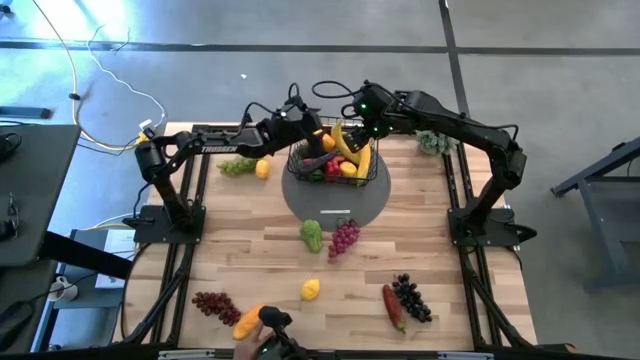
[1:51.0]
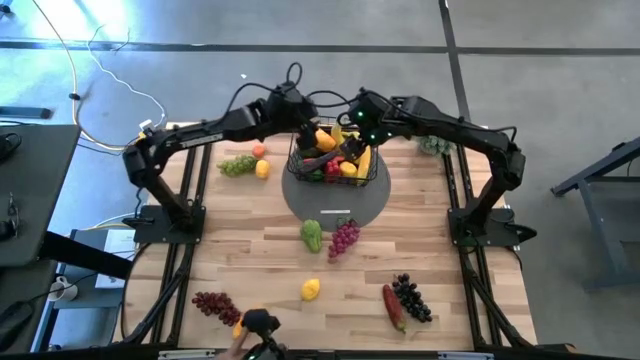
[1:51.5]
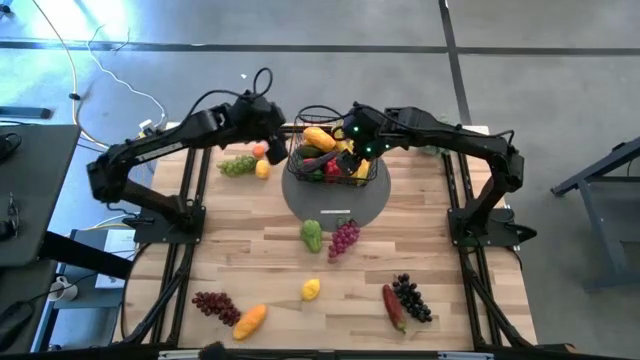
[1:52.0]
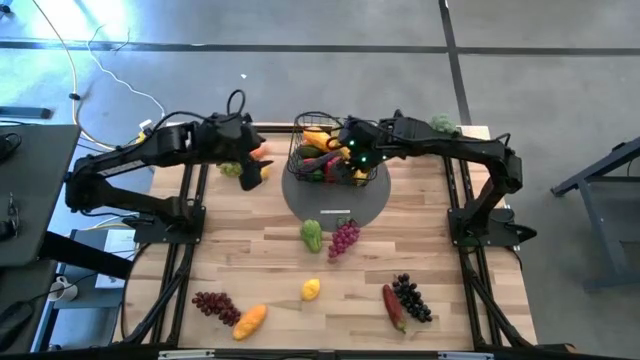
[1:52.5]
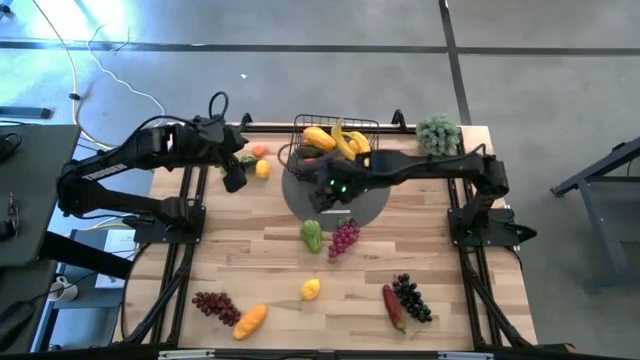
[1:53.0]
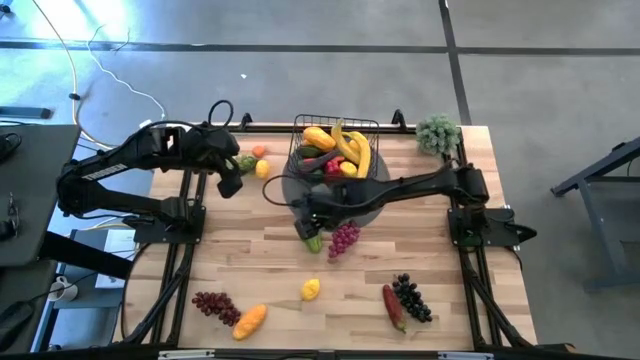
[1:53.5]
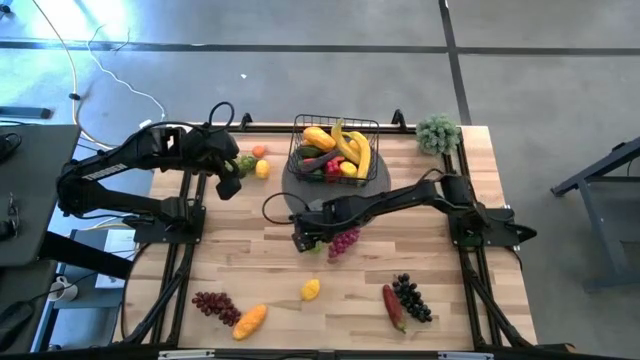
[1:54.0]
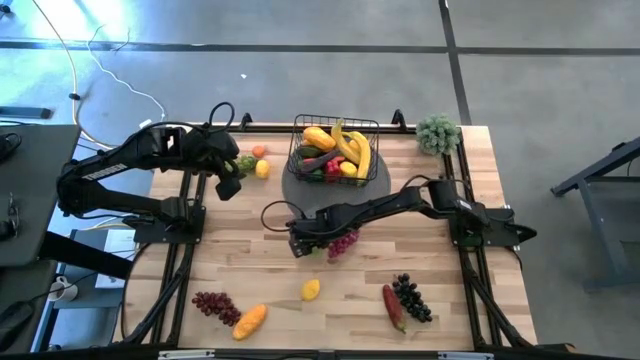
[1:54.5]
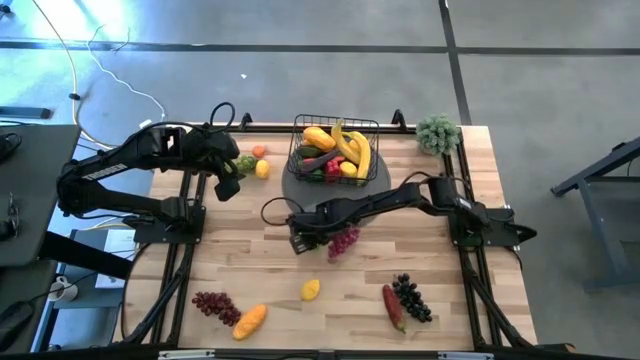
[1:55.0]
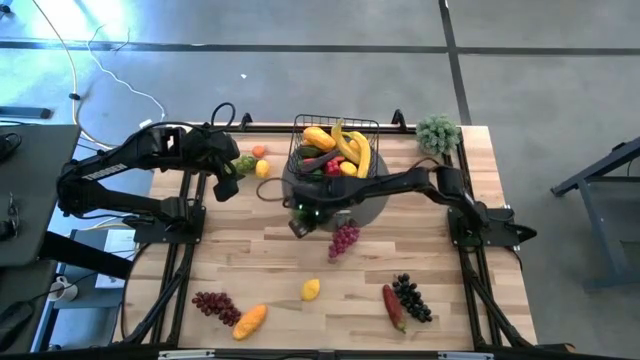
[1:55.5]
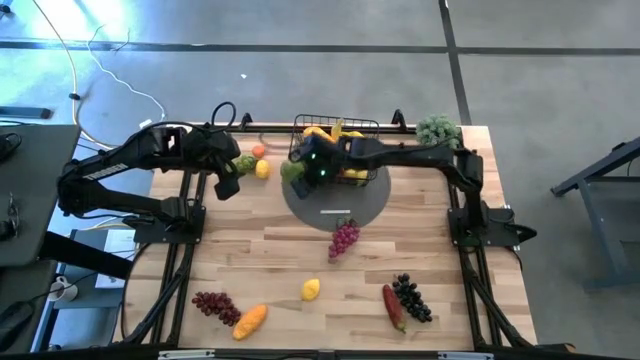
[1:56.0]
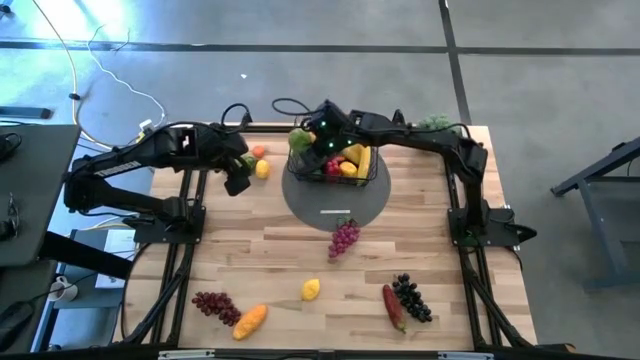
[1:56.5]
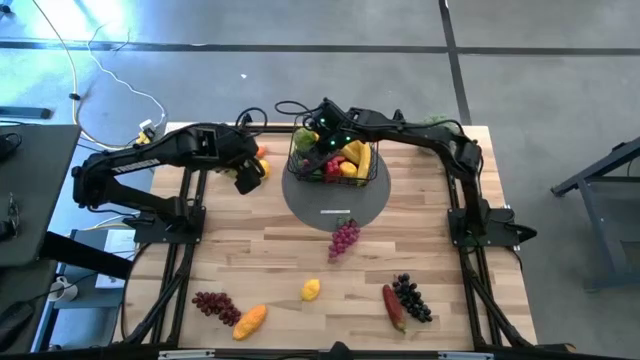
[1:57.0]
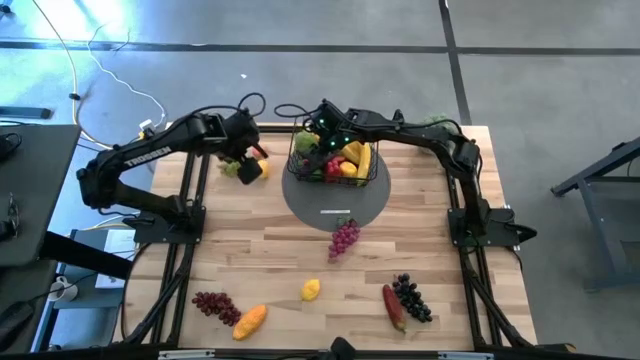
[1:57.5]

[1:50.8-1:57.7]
Task: Build produce basket
Put the green chayote into the wire basket

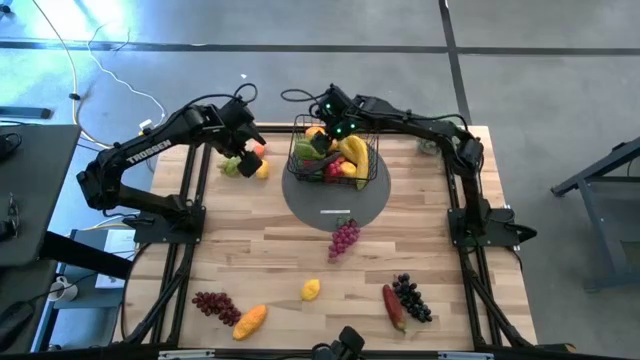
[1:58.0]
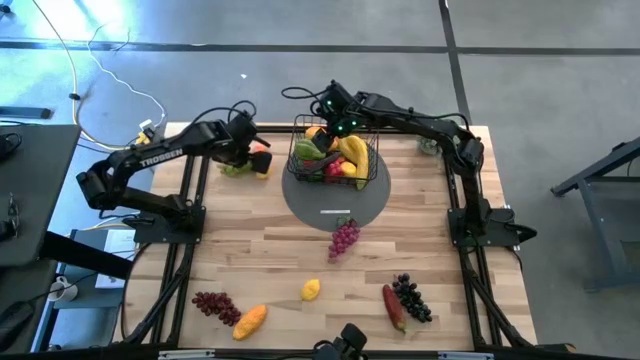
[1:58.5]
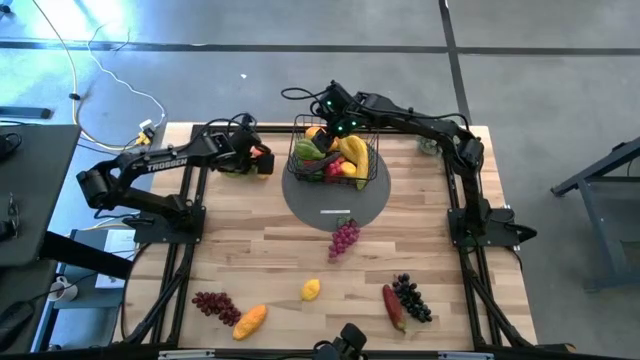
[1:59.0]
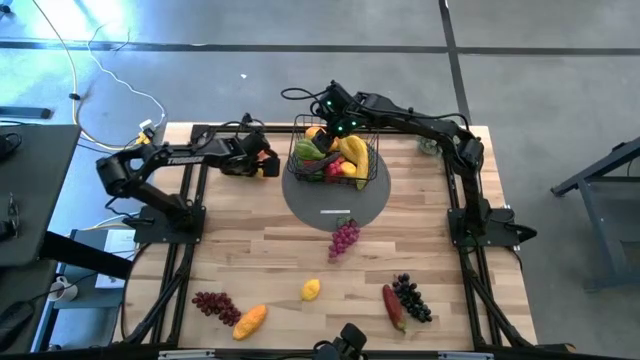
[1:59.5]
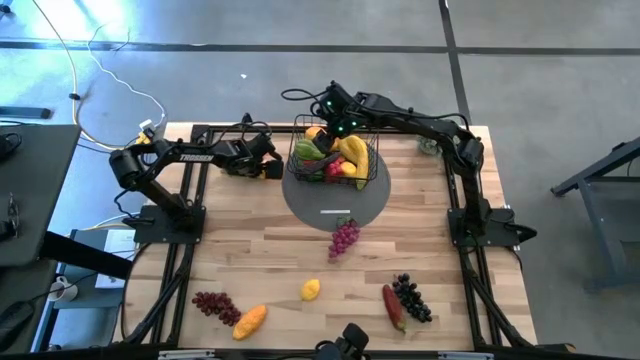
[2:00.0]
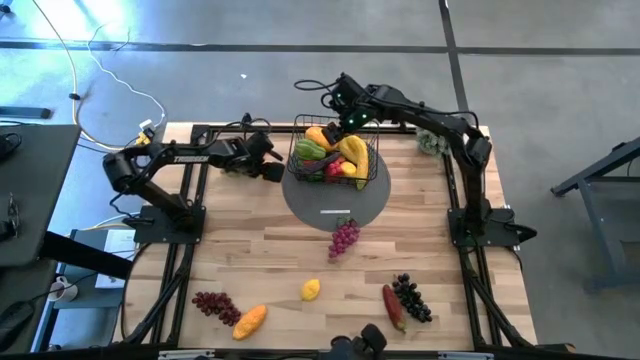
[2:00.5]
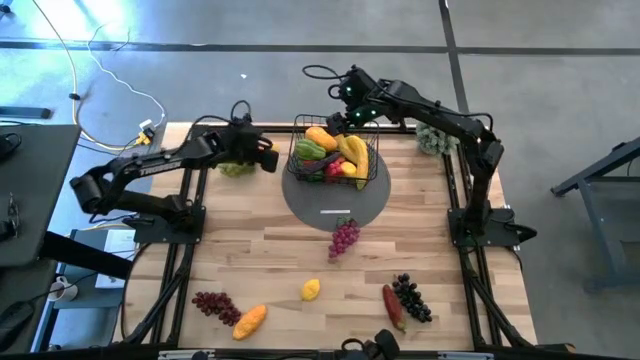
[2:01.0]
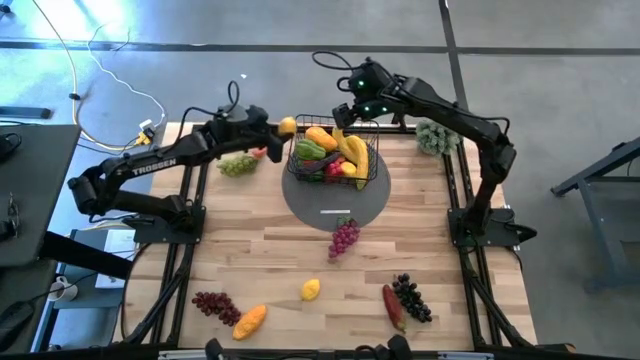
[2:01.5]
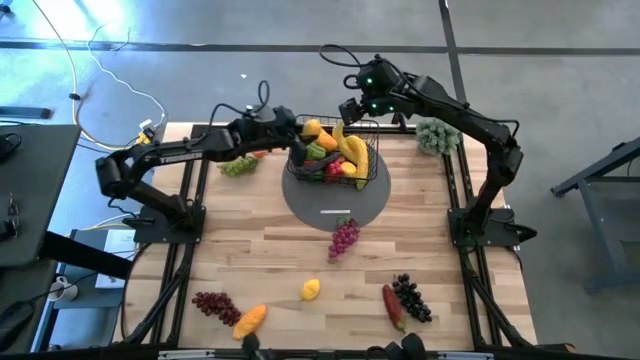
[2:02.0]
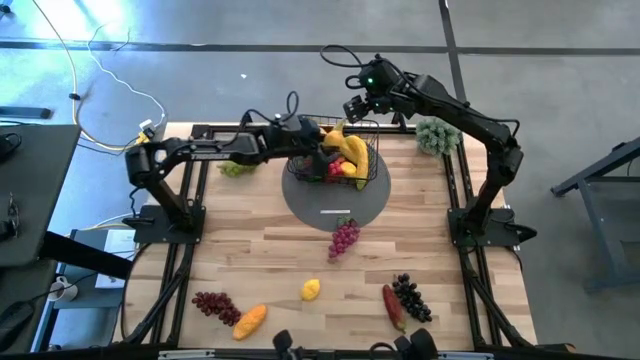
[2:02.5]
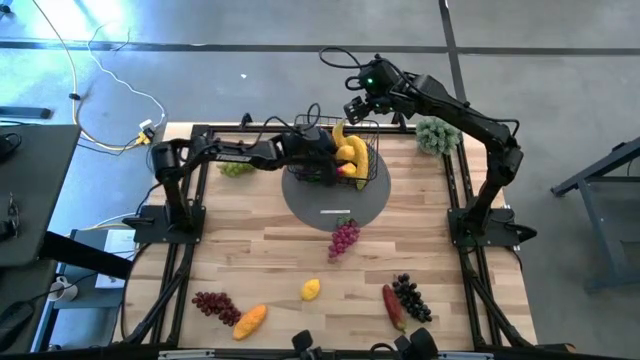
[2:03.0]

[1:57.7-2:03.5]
Put the yellow lemon into the wire basket

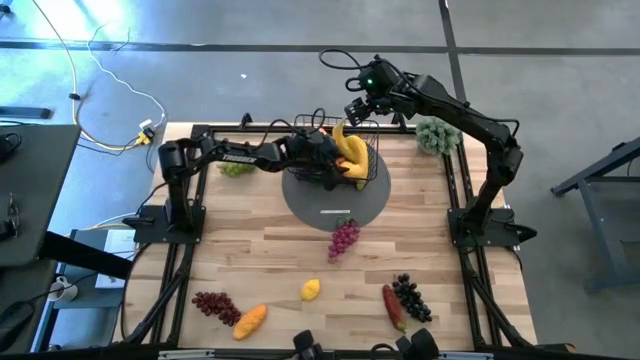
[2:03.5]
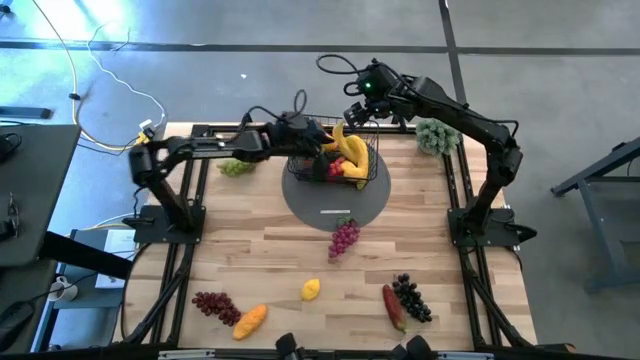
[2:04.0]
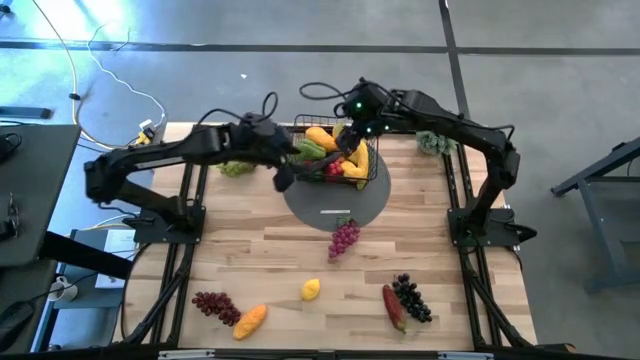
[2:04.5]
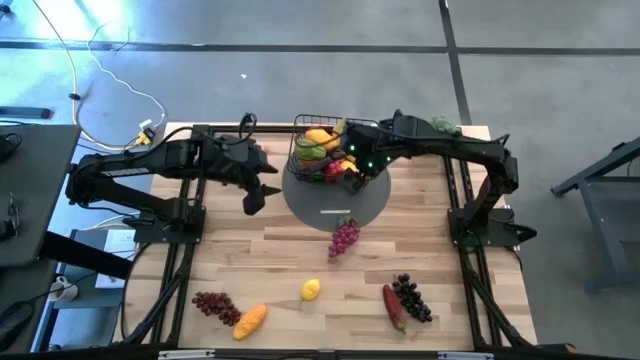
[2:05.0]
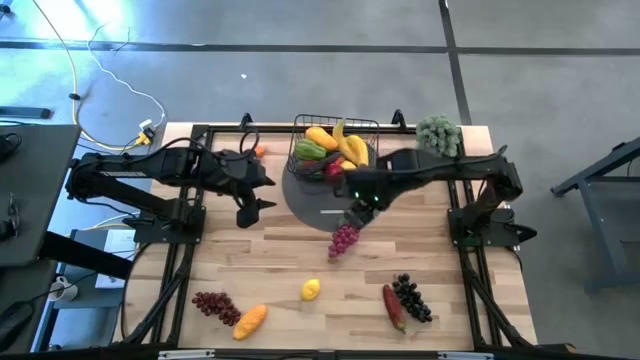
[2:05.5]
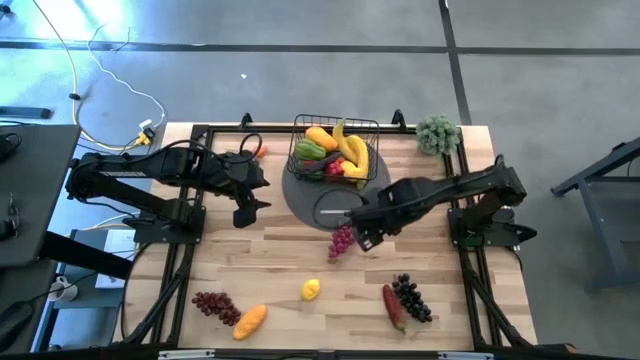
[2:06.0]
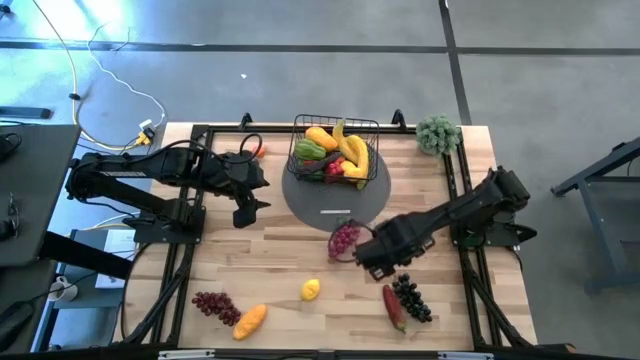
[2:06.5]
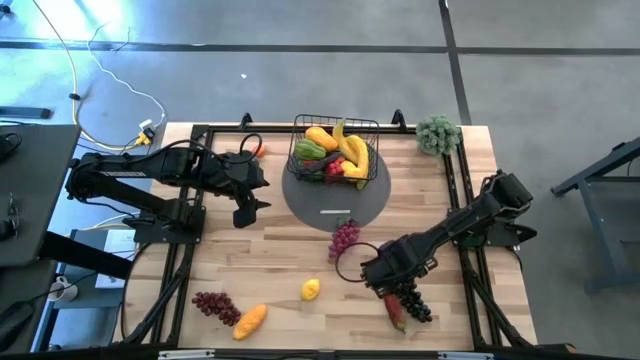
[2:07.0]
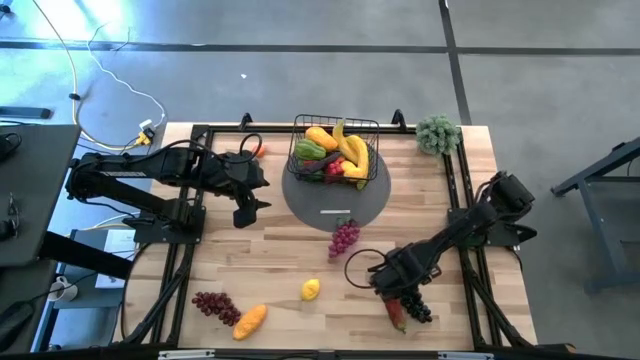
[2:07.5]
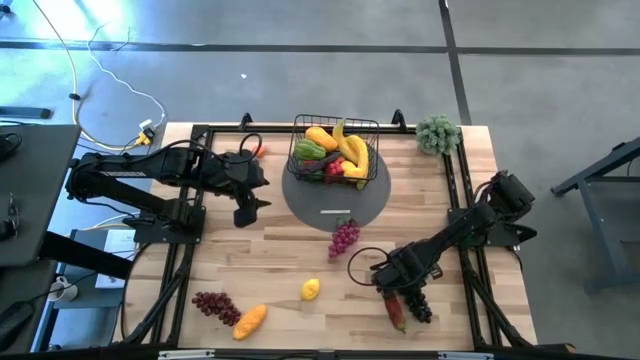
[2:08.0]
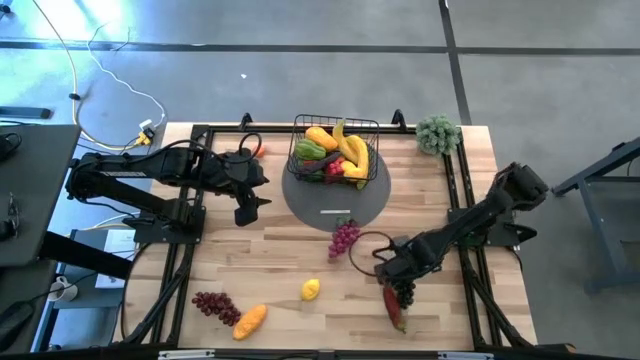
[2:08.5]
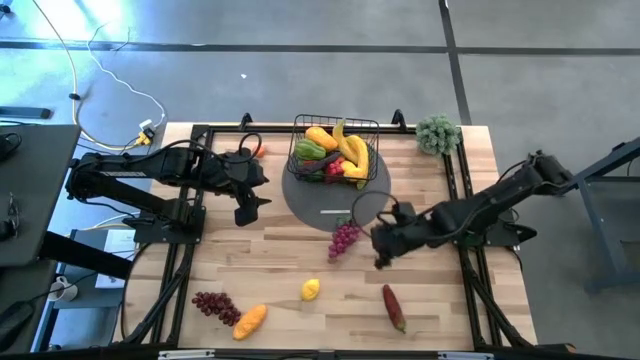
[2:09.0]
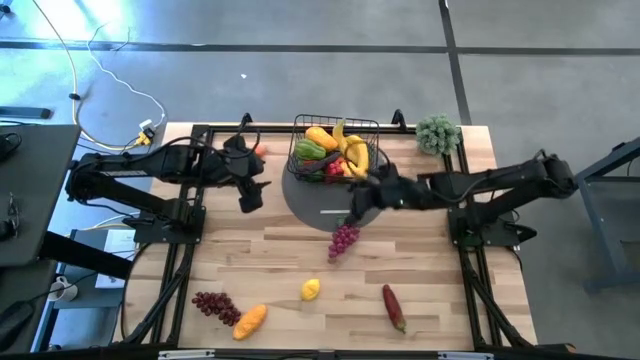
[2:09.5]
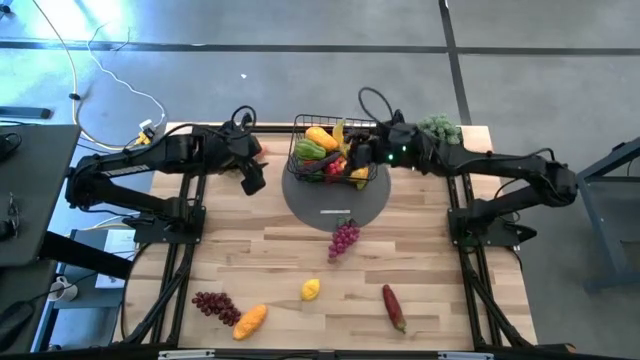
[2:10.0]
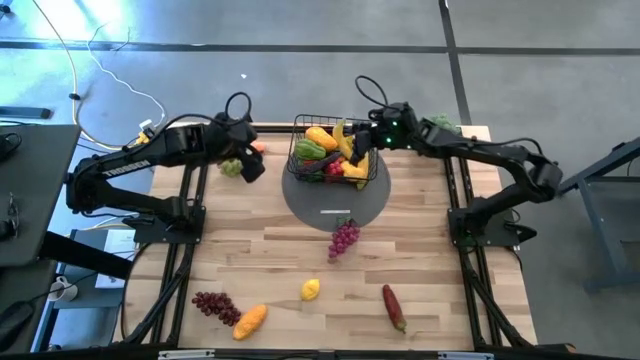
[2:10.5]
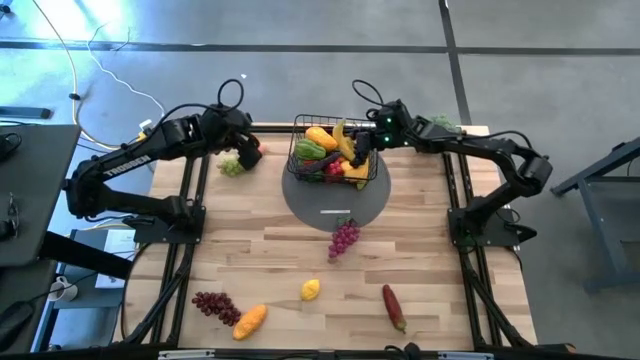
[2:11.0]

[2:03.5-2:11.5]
Put the black grapes into the wire basket
